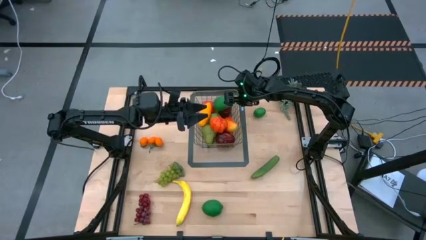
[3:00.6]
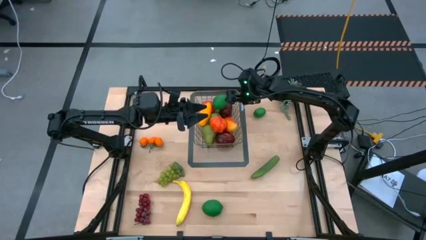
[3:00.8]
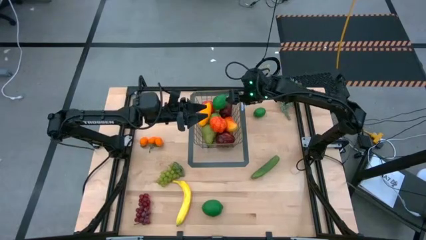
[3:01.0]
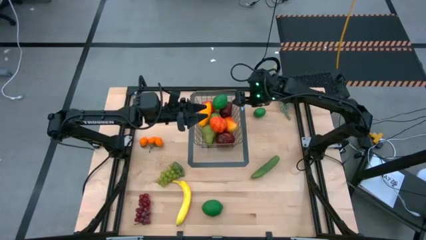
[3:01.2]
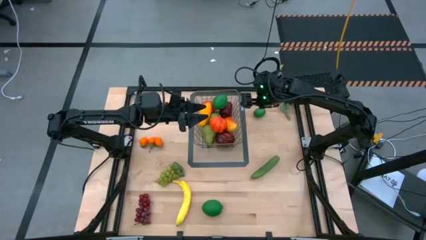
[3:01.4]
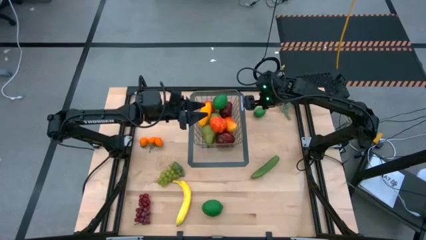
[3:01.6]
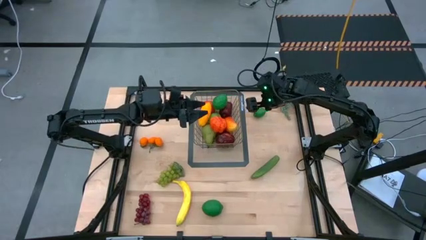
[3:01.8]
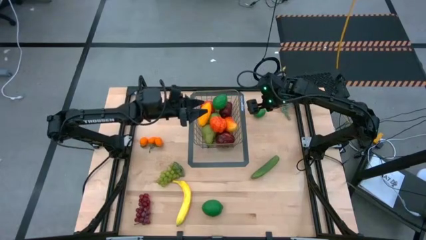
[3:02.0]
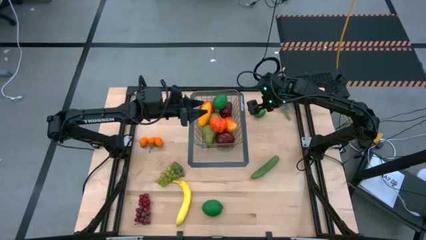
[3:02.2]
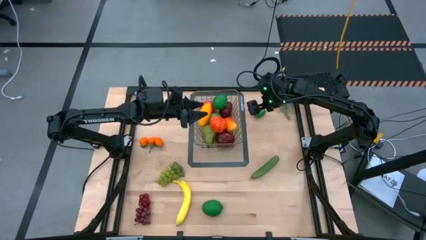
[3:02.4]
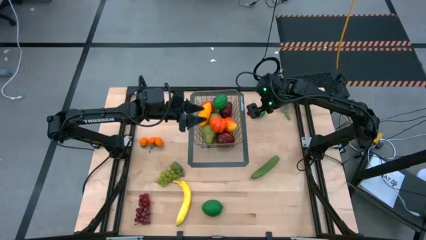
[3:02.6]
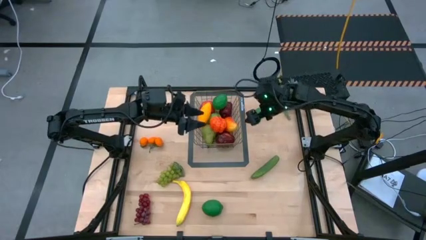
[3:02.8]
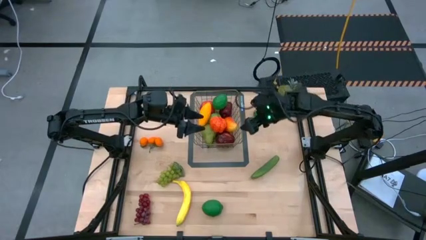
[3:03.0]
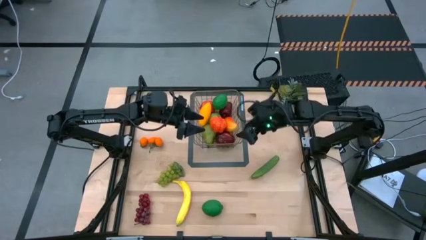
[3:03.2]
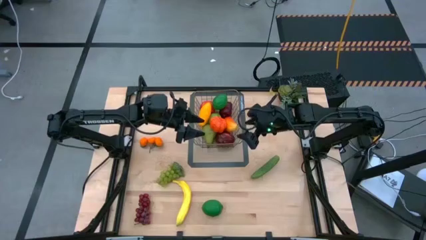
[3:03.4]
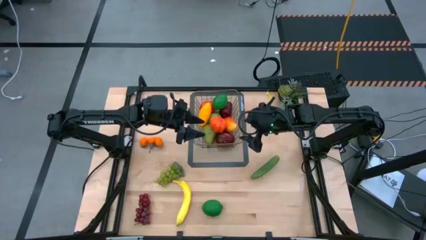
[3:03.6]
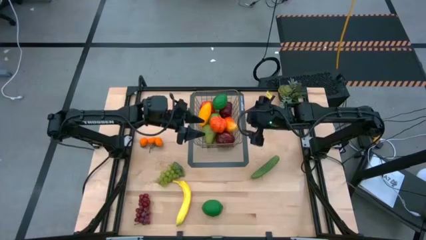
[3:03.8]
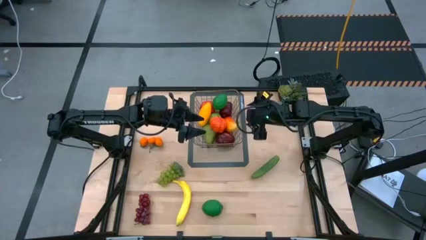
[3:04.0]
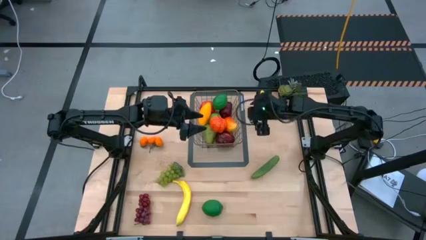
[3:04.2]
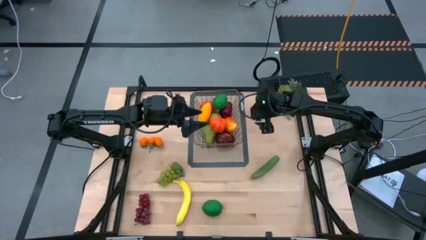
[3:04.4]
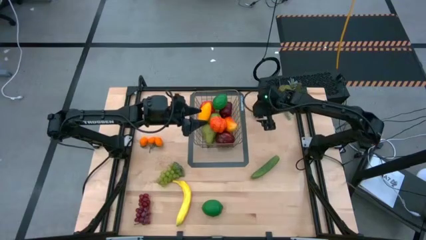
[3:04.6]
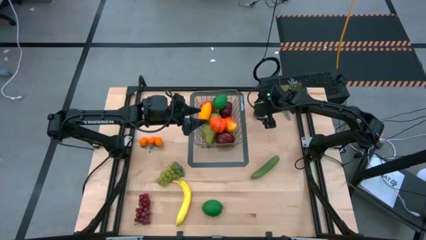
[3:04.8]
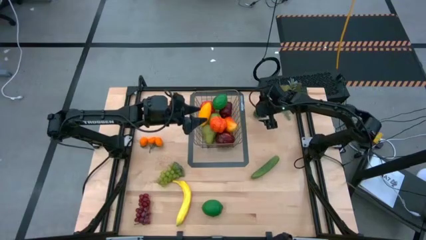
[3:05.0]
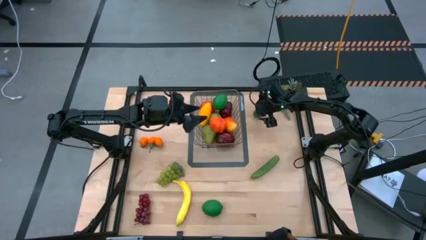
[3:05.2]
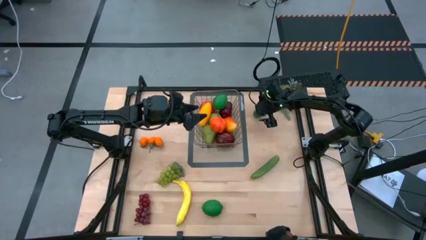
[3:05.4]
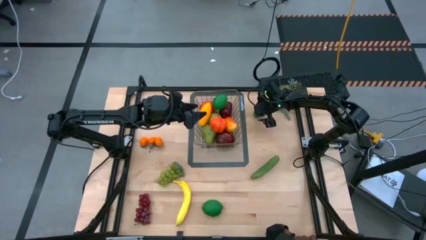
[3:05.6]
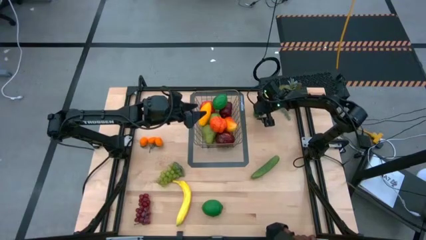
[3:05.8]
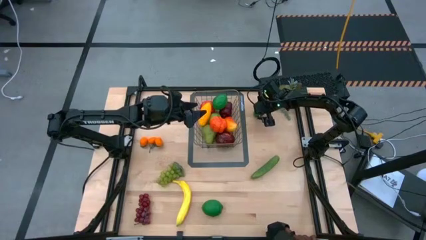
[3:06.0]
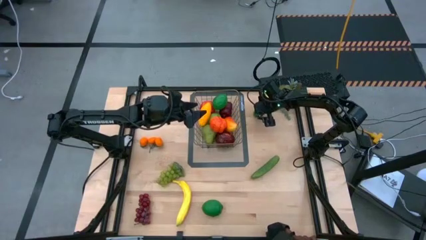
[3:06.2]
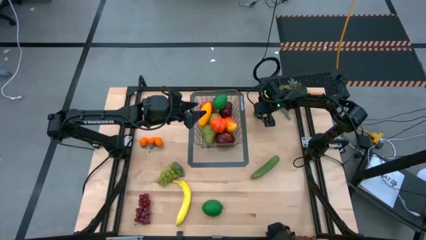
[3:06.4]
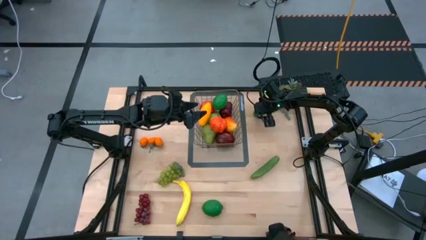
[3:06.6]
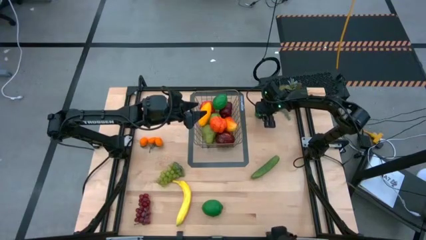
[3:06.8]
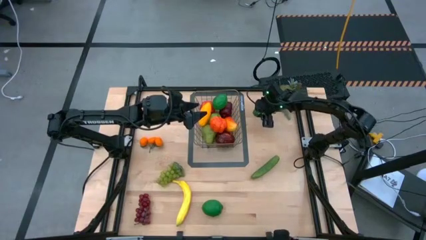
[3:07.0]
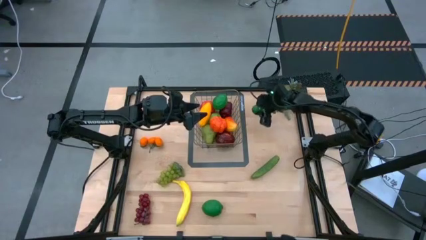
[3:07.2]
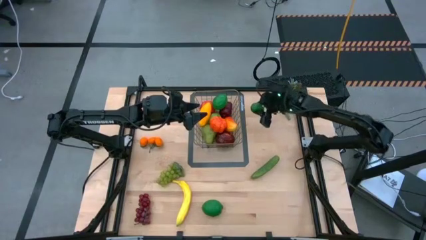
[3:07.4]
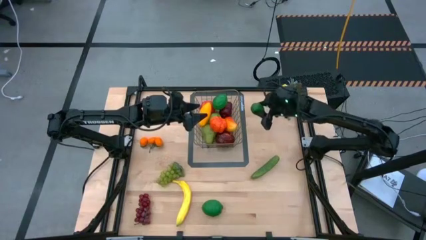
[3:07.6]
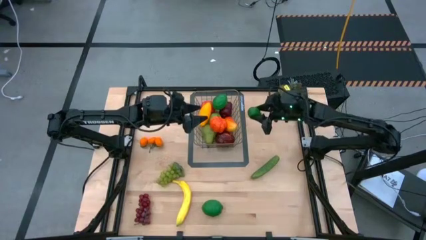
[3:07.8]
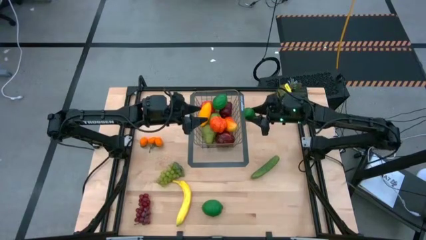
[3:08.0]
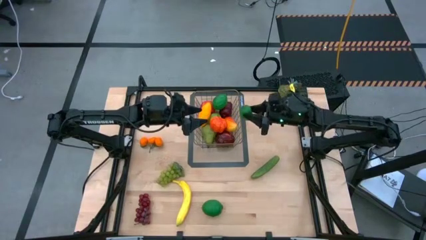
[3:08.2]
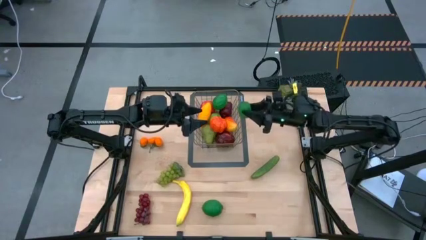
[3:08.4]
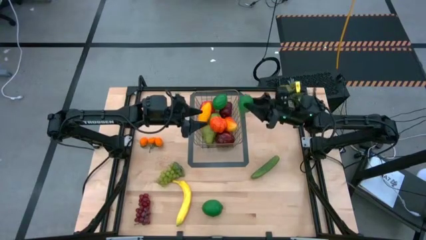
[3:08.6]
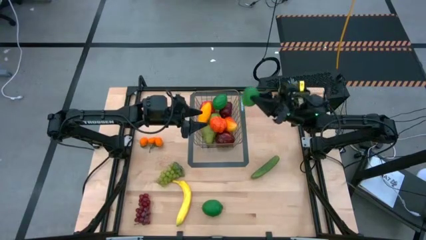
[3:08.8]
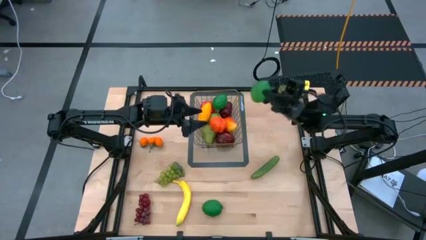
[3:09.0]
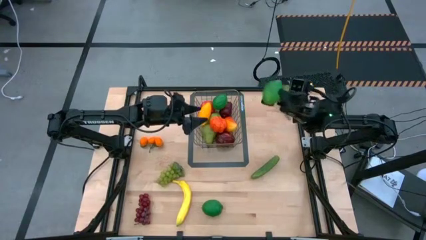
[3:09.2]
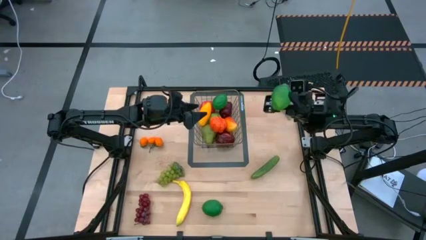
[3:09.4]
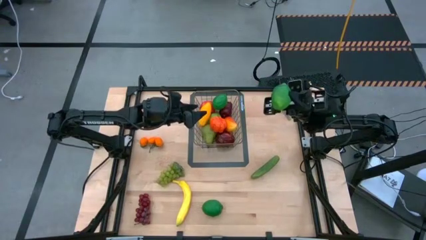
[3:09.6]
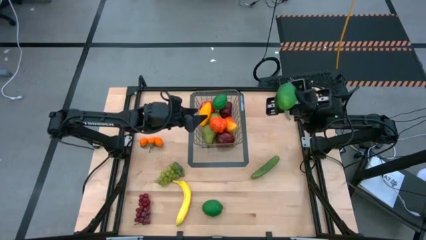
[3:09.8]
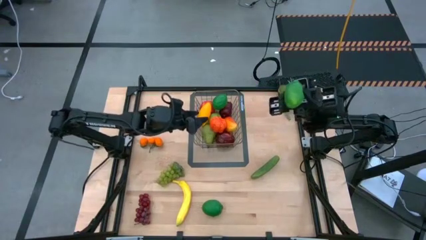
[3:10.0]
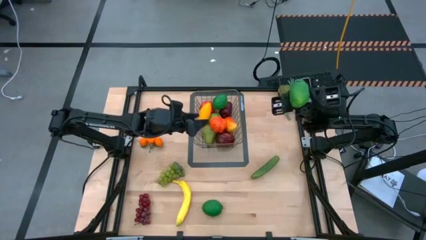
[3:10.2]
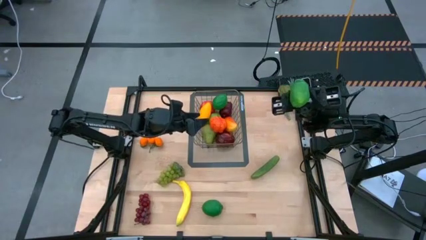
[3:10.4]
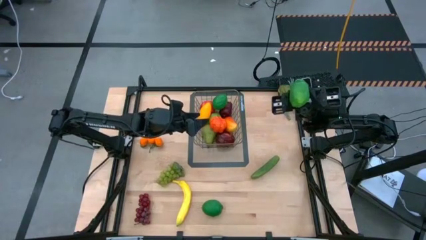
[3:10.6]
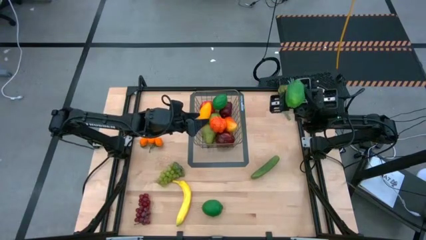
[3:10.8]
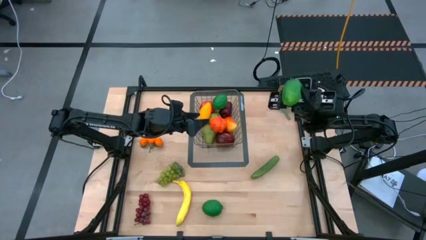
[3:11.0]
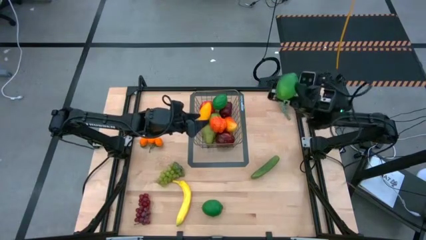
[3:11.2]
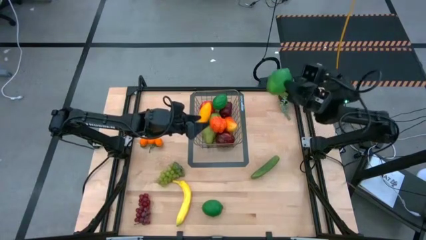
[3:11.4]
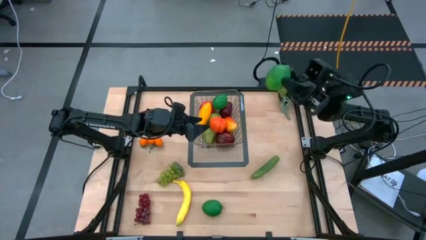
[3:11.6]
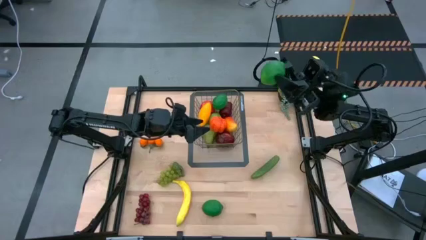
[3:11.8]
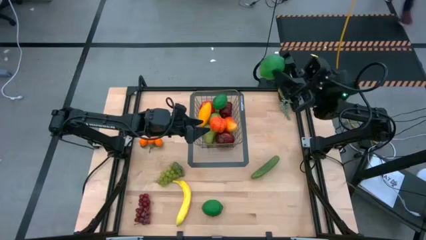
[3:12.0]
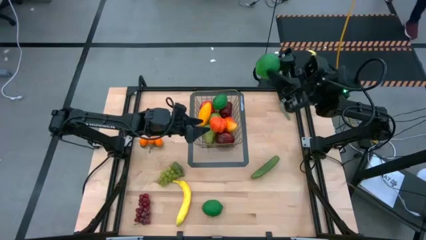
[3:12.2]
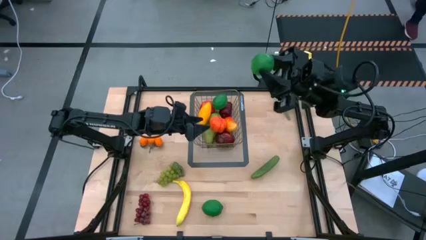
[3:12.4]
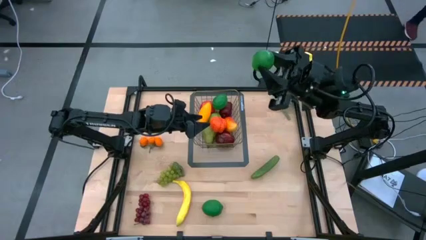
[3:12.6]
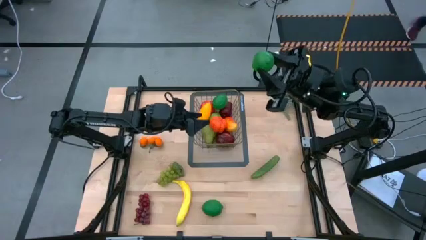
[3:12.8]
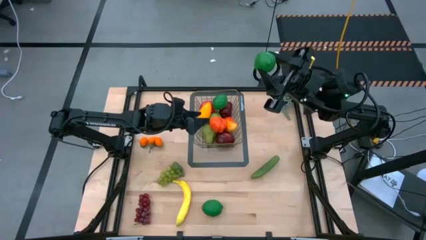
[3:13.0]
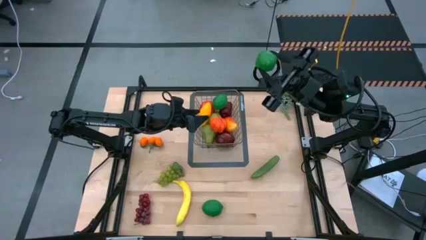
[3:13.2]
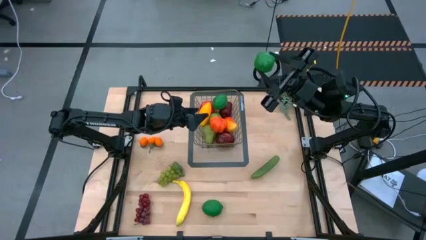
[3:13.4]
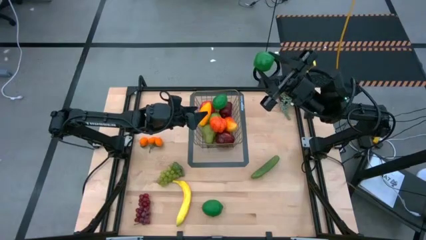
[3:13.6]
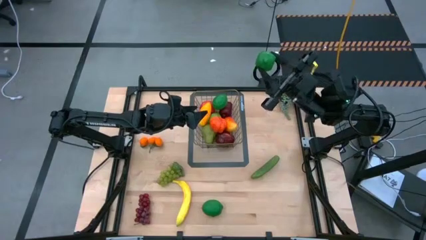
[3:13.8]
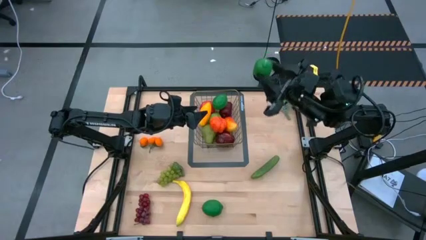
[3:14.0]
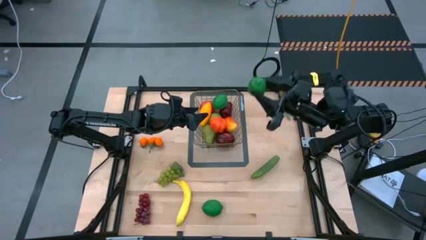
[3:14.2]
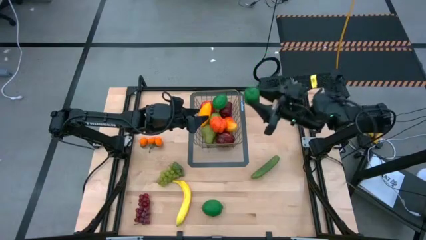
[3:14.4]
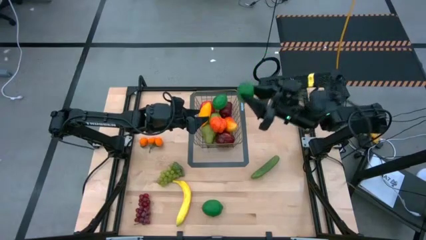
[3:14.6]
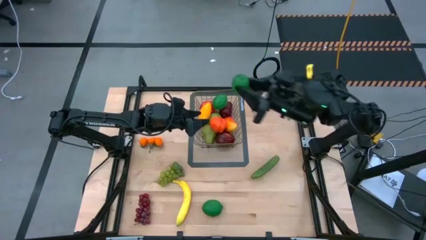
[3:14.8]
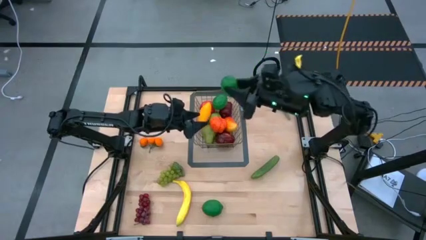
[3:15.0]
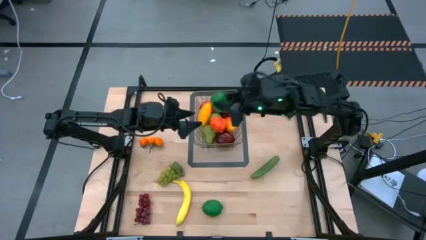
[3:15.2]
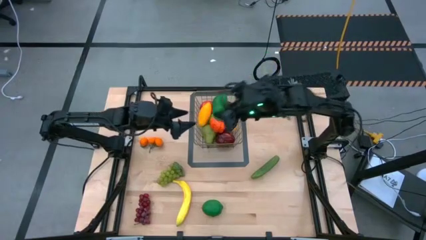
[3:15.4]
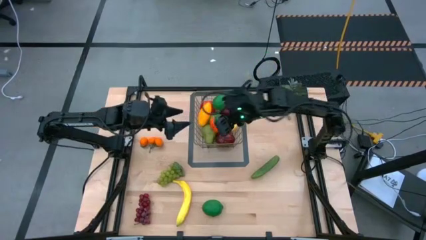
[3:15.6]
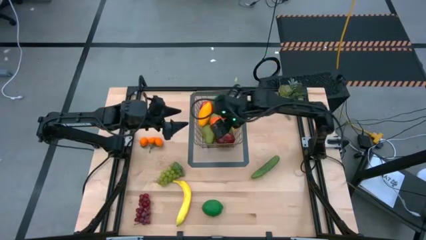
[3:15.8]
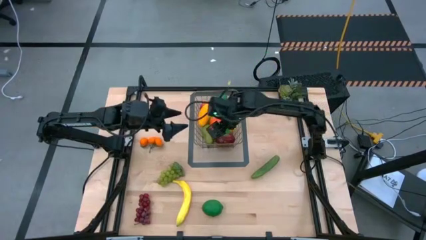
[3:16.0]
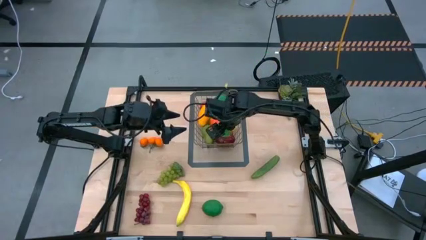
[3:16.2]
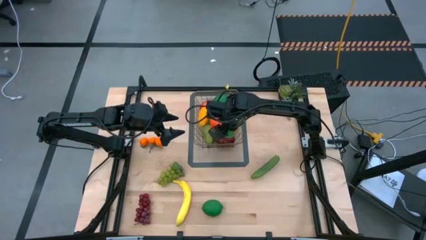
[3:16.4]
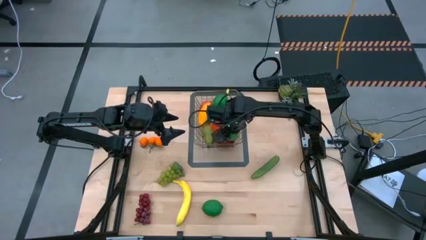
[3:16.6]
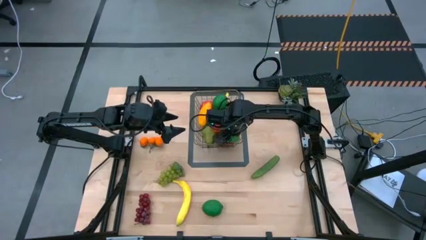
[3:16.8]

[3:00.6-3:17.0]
Task: Build produce basket
Put the top green lime into the gold wire basket

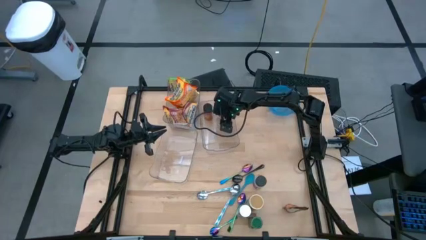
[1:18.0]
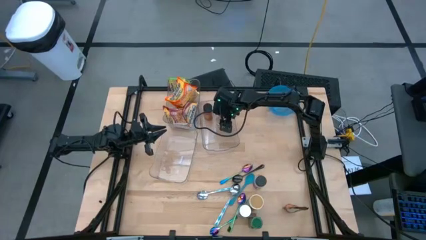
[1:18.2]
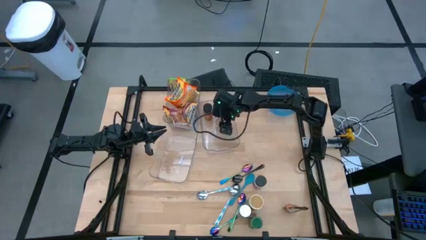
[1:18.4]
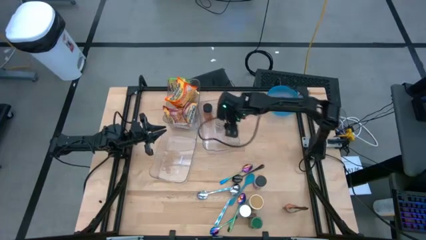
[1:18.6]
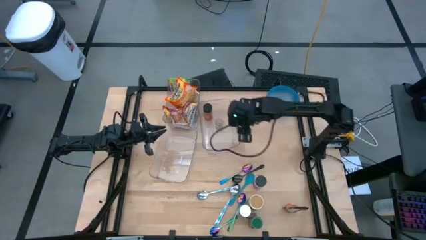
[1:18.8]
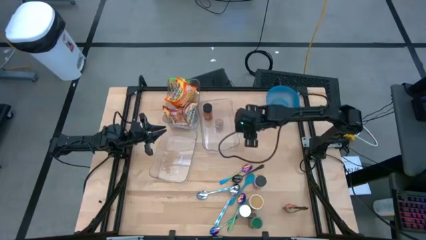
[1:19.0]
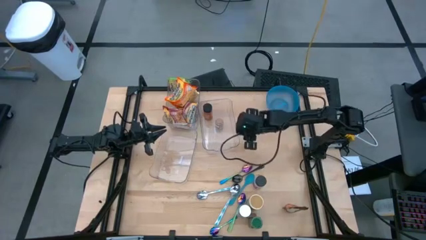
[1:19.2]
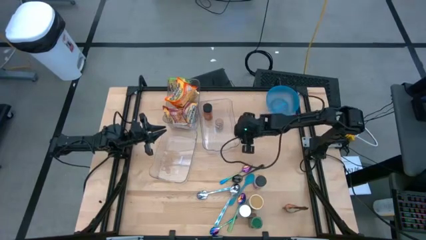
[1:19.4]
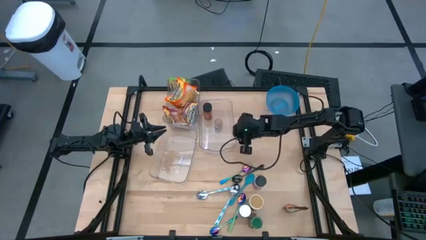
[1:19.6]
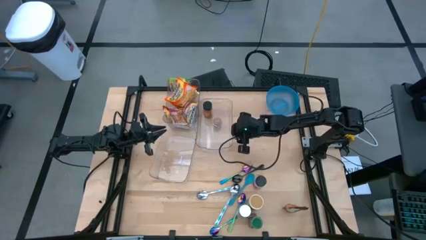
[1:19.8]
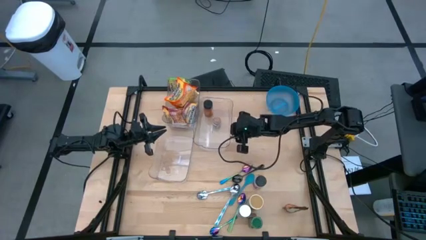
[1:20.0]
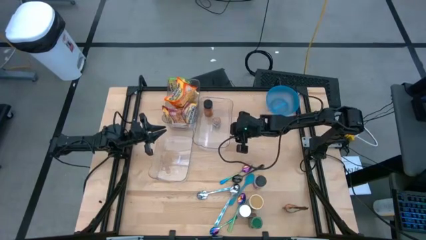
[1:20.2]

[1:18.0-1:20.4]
Task: Pick & Place Food Item
Adjust the middle transparent bin
